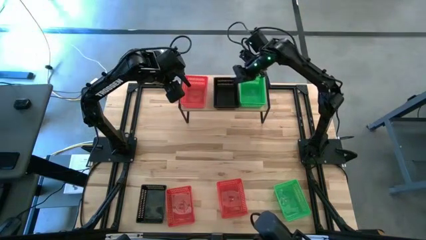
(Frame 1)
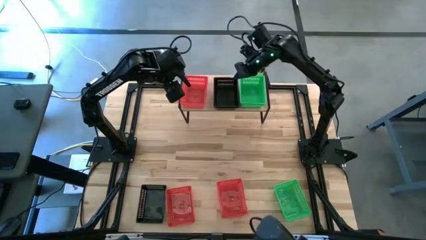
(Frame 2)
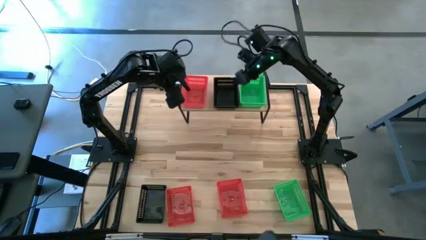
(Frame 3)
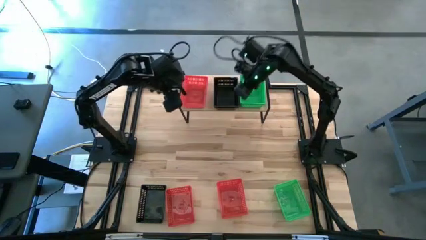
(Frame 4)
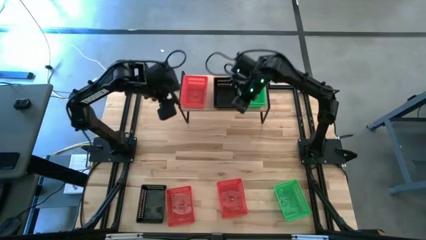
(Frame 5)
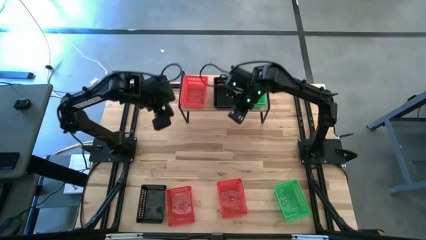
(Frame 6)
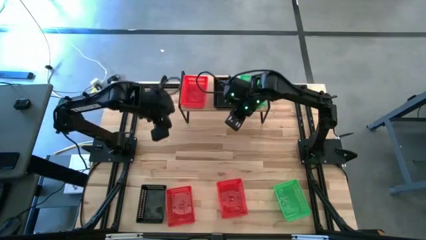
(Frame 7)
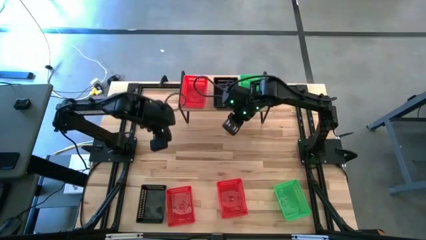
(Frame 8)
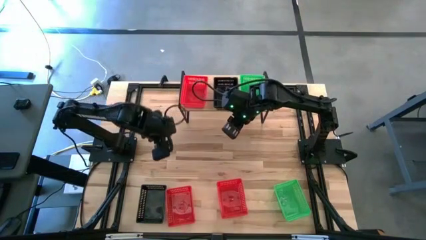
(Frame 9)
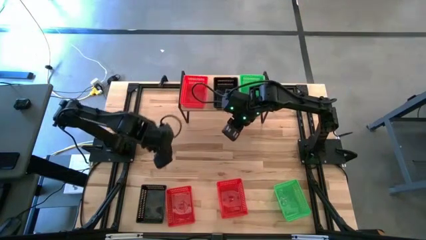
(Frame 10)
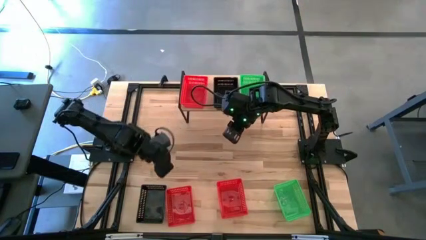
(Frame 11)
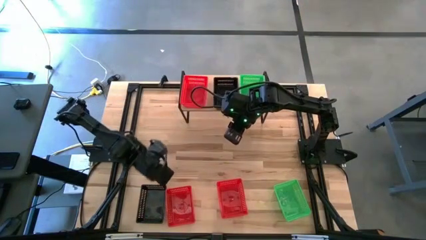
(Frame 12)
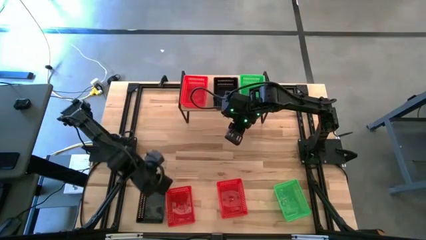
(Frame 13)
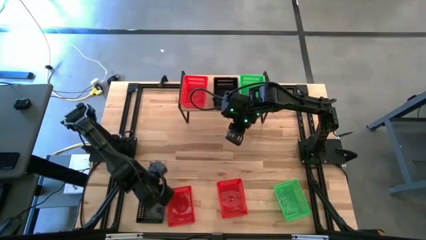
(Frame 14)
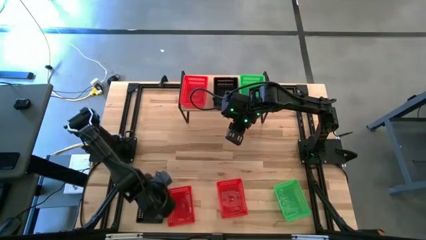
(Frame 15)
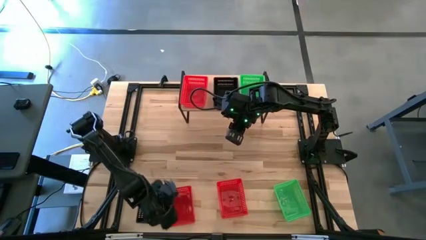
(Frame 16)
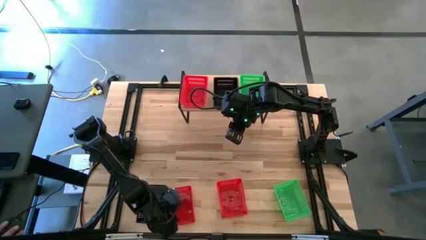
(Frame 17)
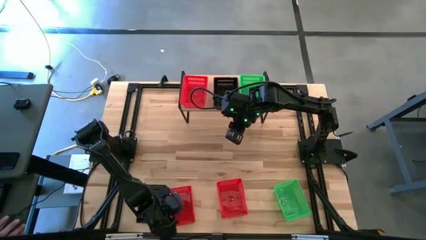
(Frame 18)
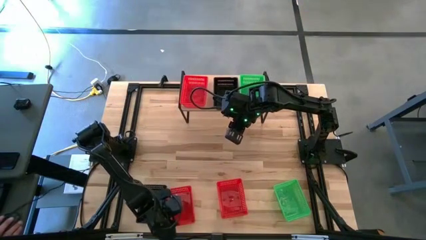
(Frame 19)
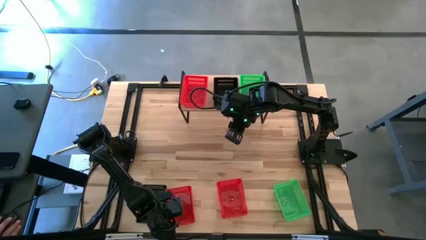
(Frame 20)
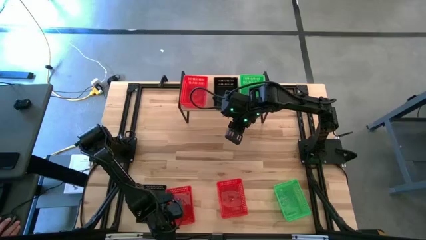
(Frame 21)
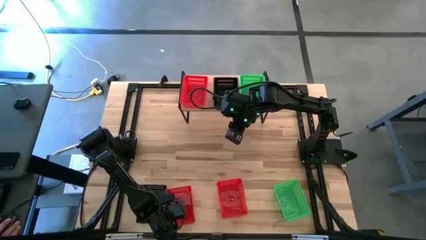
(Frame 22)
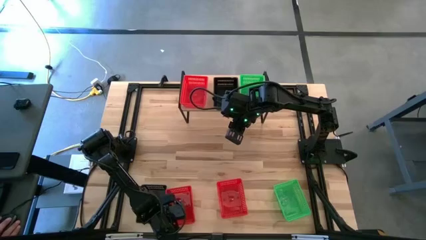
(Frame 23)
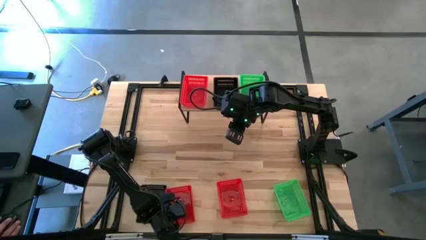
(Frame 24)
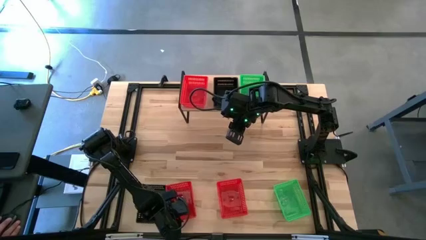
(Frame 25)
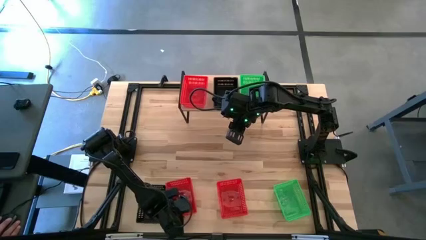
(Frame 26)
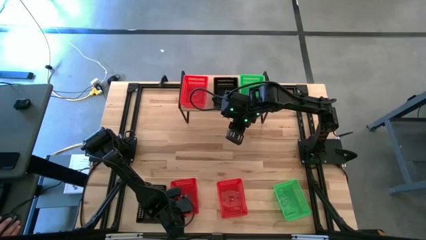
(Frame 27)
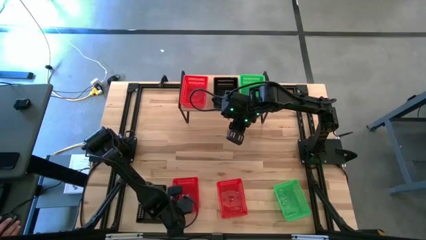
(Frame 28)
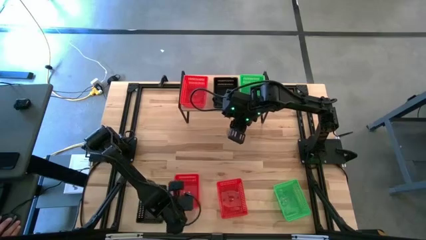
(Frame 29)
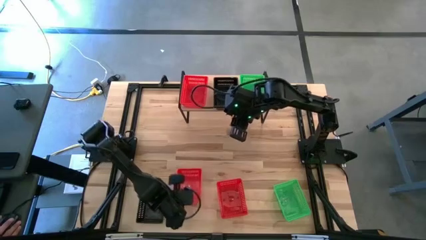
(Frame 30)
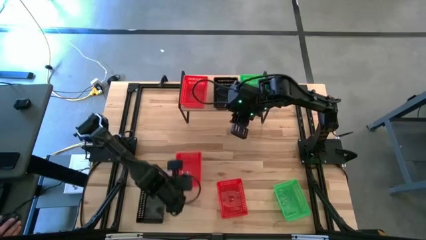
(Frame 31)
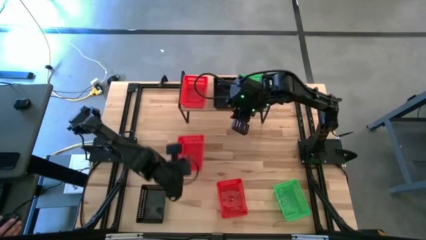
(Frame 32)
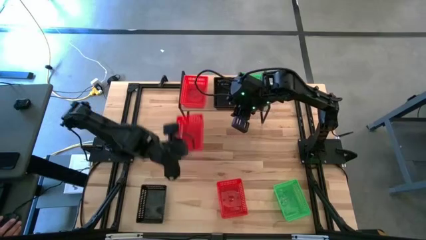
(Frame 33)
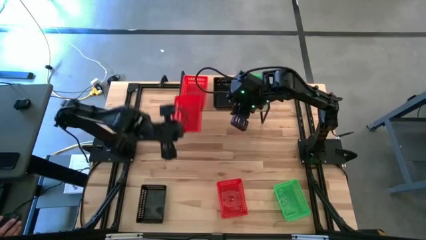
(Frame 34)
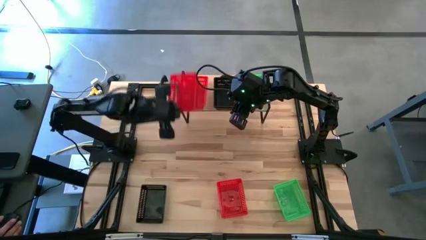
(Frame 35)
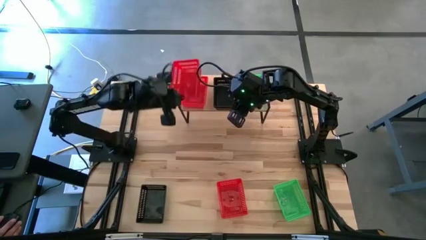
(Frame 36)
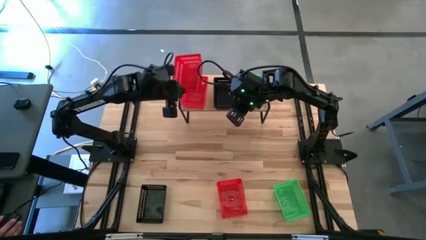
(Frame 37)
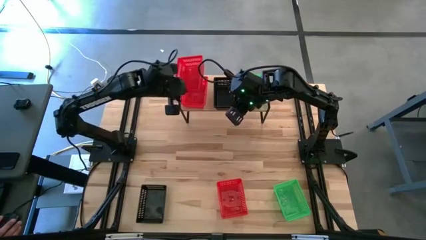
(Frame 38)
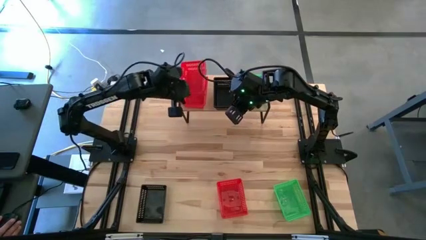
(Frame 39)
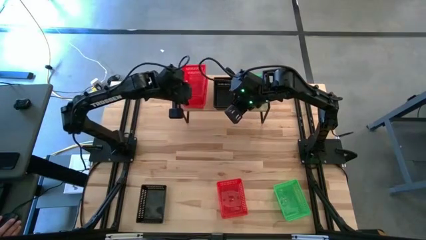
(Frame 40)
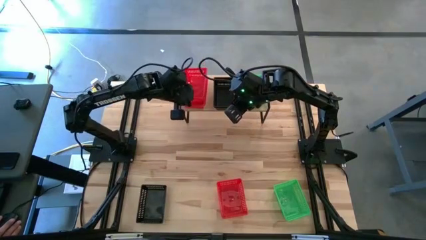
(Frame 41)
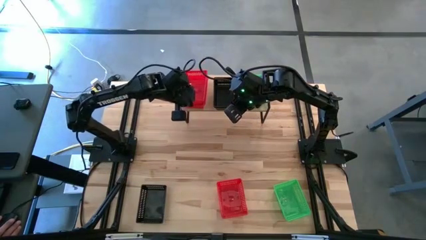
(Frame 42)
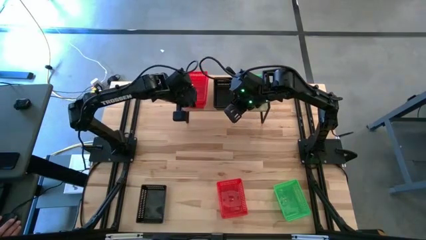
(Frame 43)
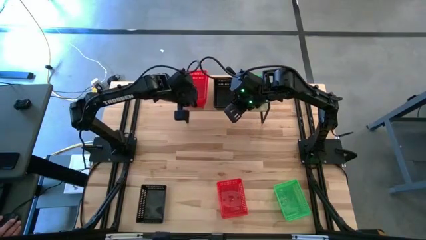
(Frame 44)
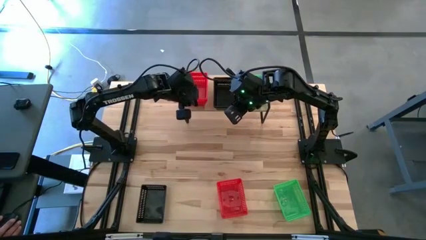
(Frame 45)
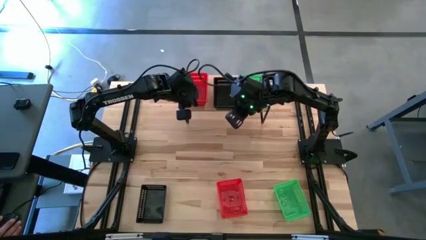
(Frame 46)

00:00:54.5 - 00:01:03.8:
Task: Stack baskets on shelf by color
Stack the left red bin on the red bin on the shelf

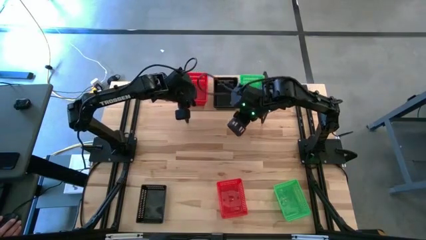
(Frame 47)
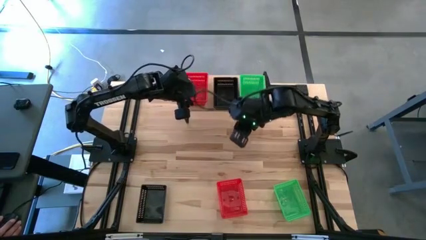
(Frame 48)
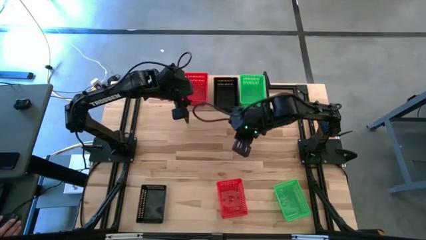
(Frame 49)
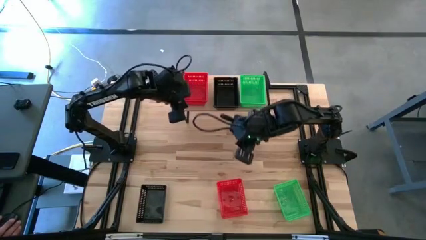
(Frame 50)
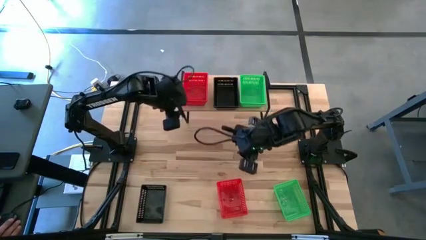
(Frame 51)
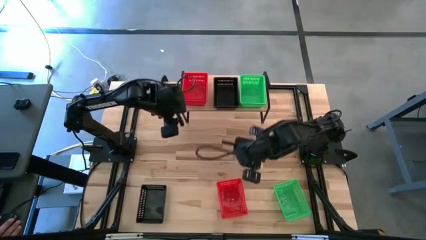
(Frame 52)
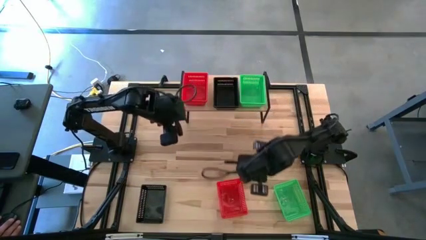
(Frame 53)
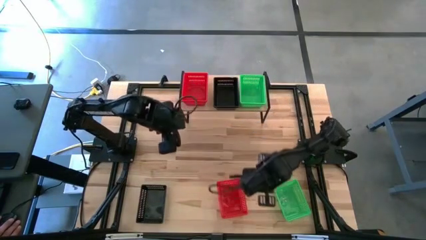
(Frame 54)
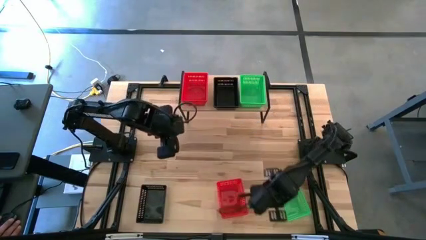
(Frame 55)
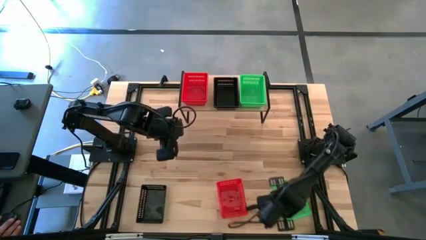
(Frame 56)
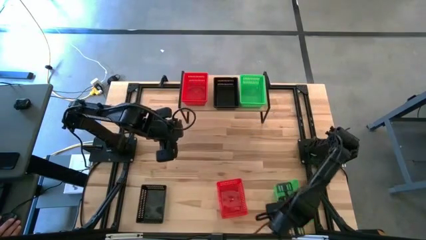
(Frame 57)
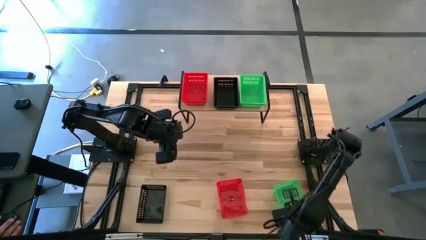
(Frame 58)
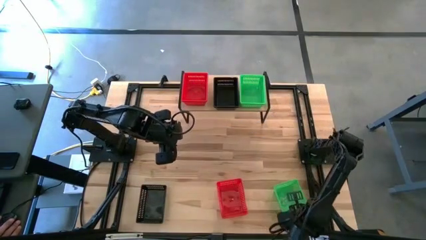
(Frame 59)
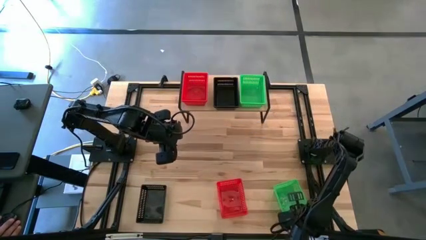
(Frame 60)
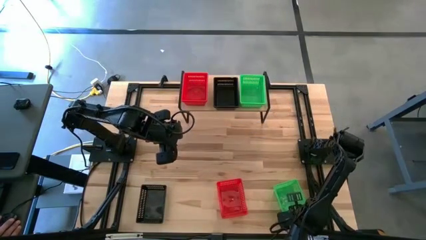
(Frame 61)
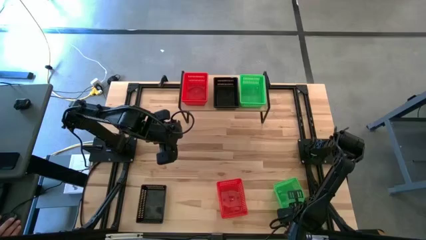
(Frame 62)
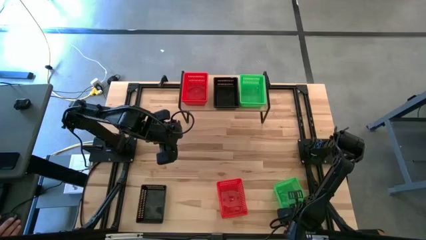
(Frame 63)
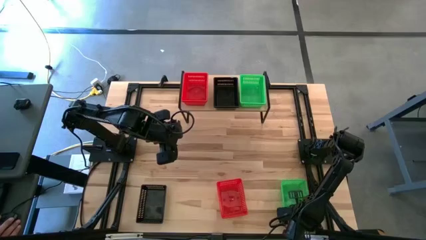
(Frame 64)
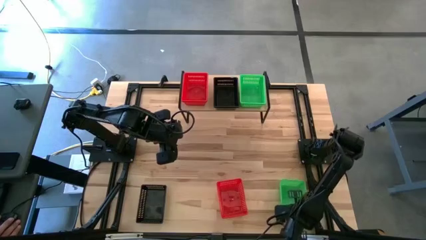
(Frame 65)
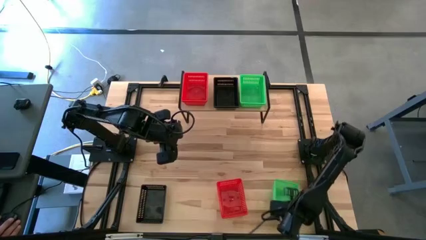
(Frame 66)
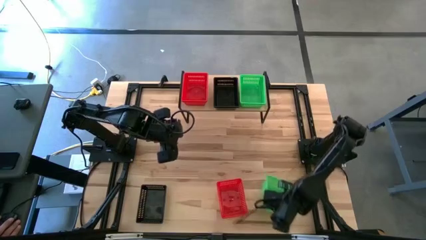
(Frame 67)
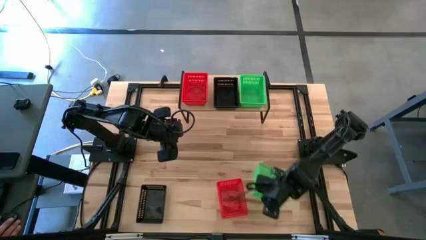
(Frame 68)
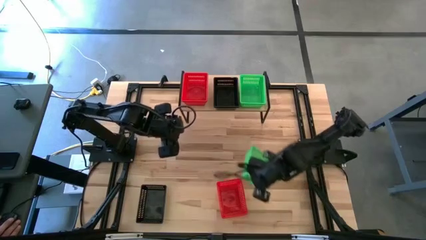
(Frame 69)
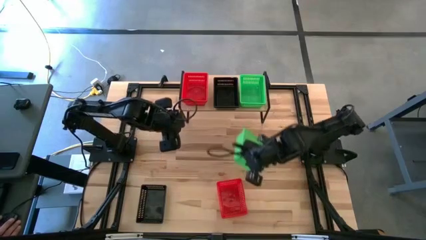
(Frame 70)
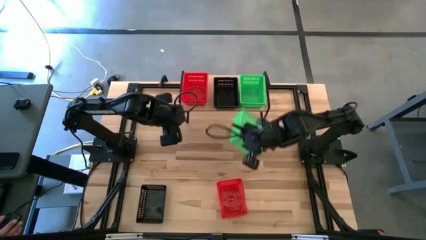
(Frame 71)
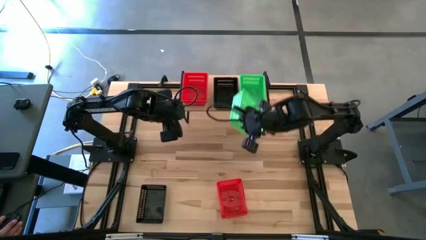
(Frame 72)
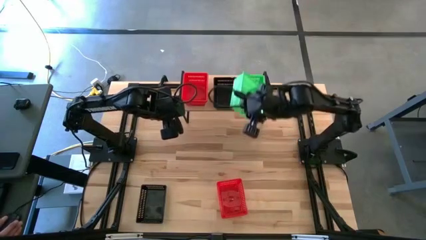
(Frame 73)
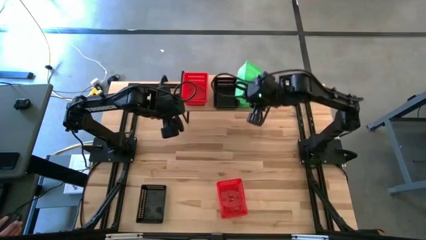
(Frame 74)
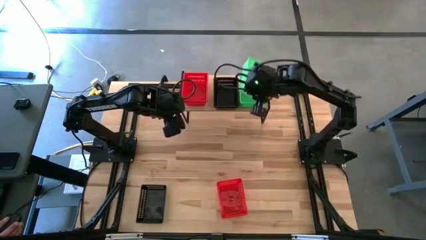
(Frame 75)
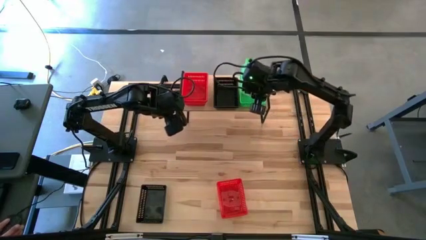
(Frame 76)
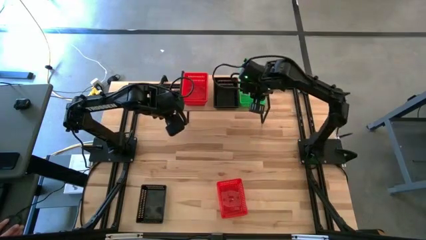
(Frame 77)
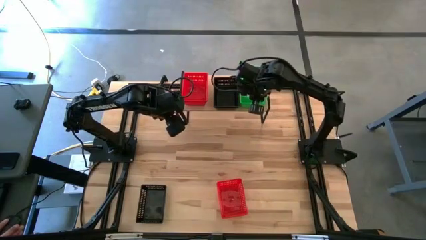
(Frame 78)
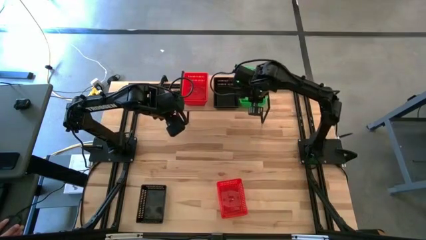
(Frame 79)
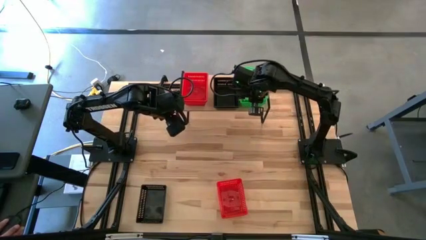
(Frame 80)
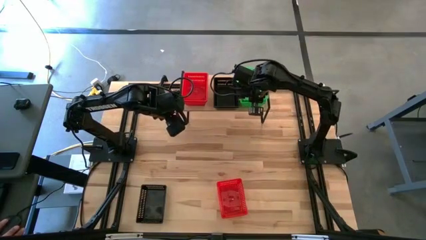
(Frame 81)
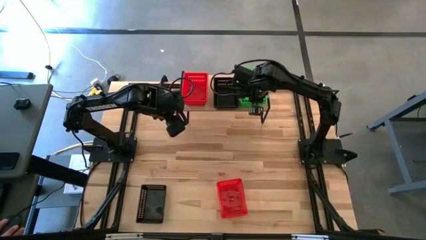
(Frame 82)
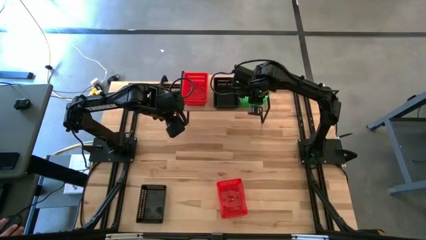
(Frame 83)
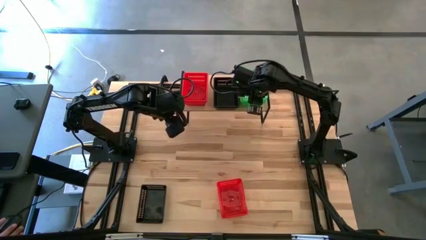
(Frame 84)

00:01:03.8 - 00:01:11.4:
Stack the green bin on the stacked green bins on the shelf
